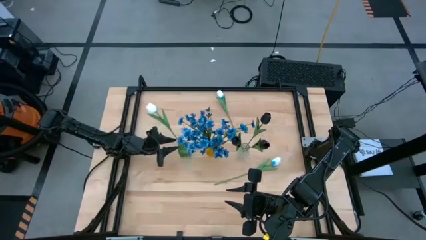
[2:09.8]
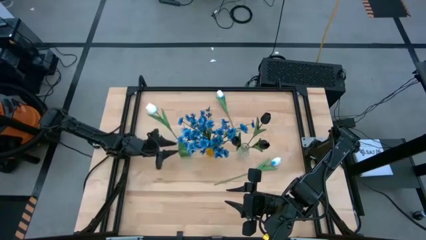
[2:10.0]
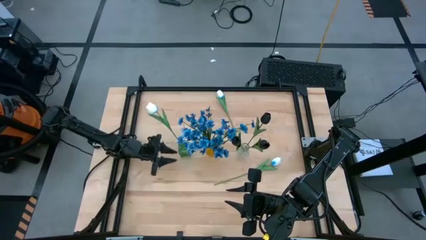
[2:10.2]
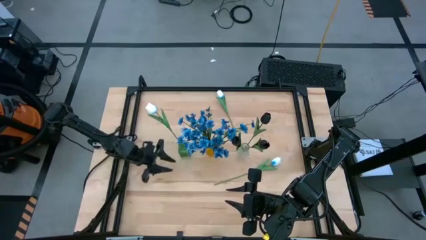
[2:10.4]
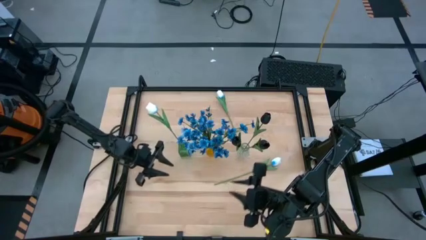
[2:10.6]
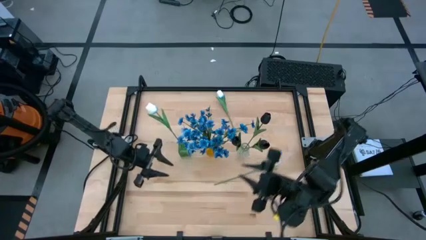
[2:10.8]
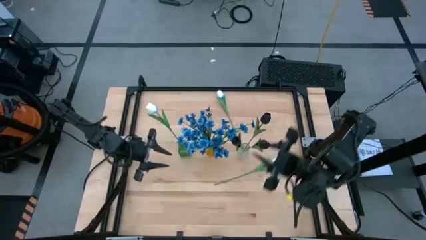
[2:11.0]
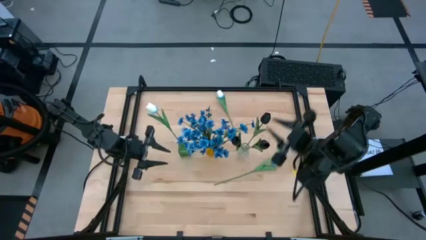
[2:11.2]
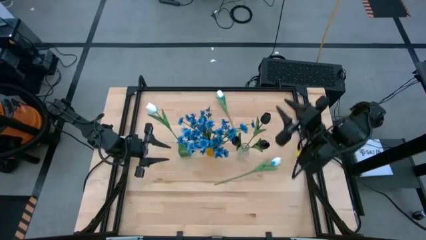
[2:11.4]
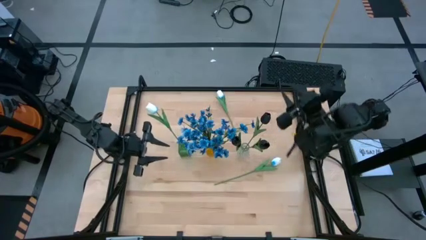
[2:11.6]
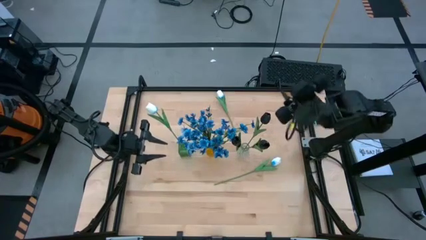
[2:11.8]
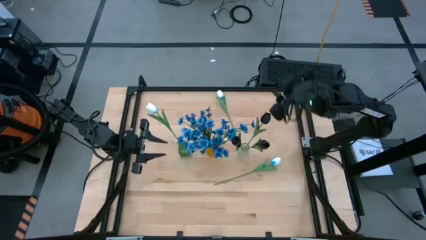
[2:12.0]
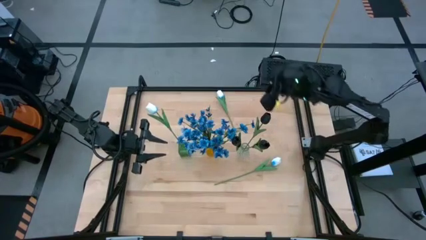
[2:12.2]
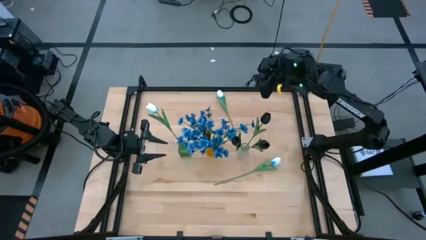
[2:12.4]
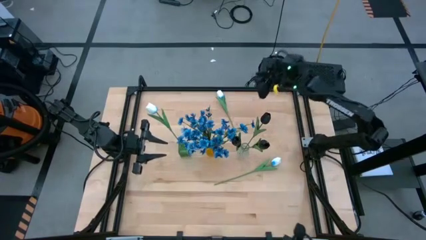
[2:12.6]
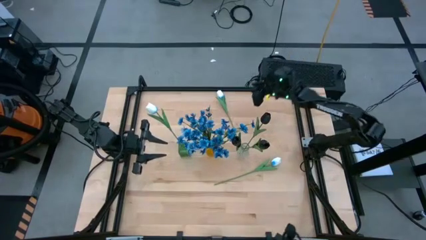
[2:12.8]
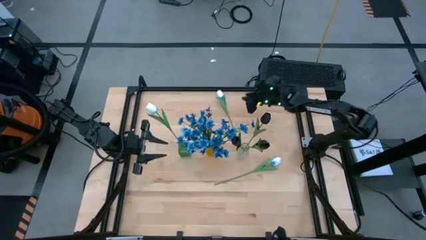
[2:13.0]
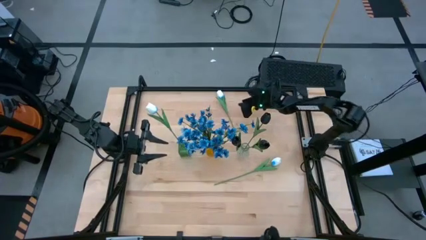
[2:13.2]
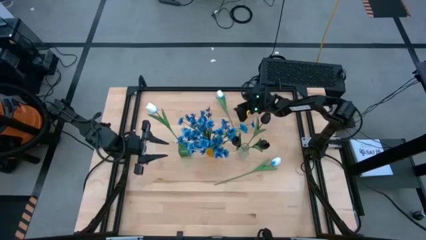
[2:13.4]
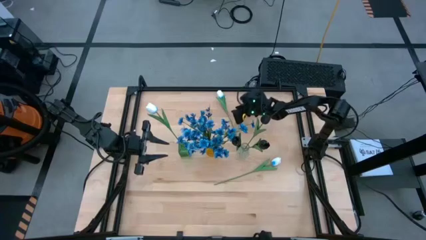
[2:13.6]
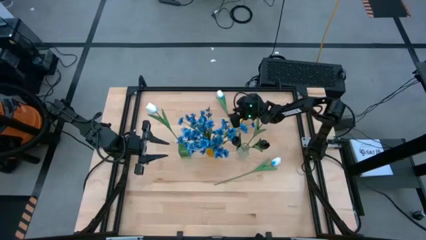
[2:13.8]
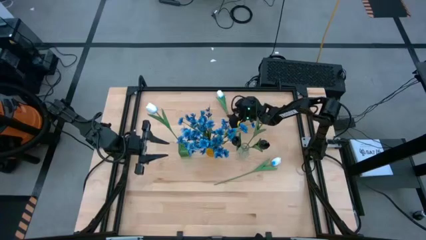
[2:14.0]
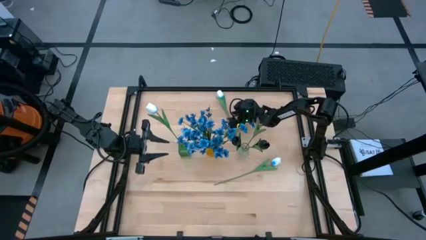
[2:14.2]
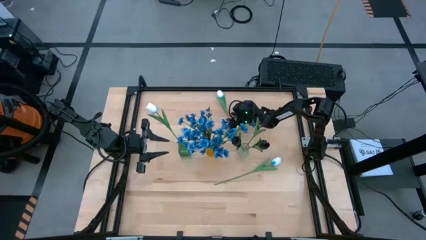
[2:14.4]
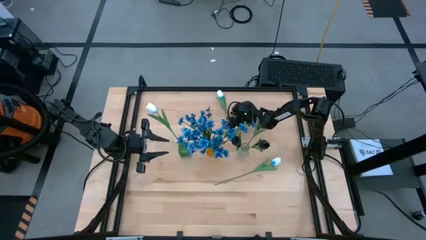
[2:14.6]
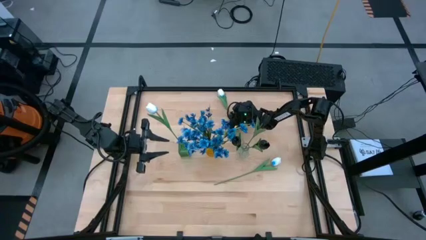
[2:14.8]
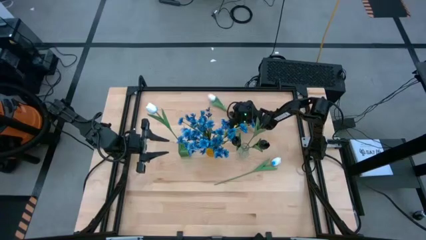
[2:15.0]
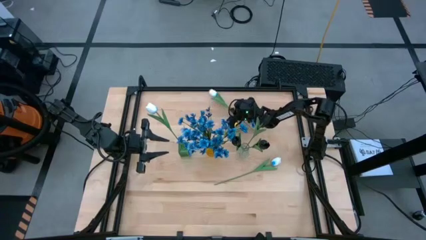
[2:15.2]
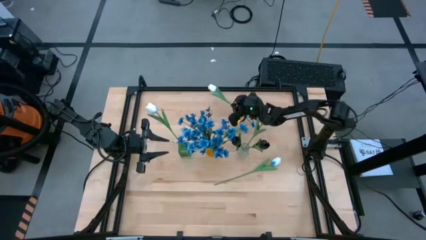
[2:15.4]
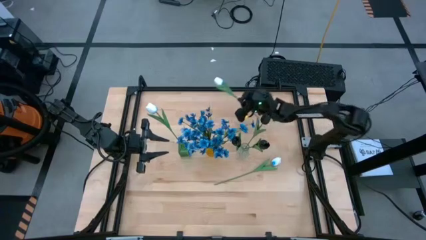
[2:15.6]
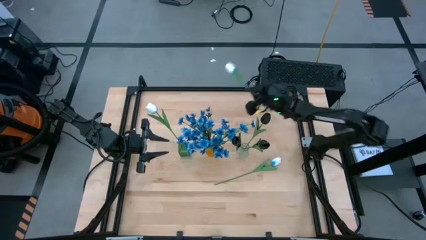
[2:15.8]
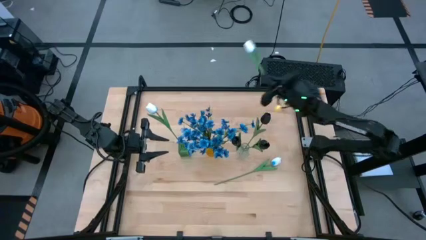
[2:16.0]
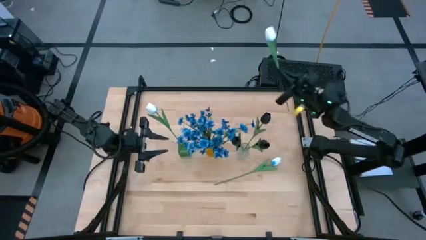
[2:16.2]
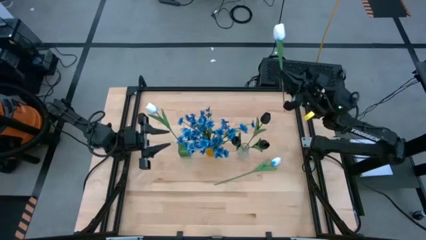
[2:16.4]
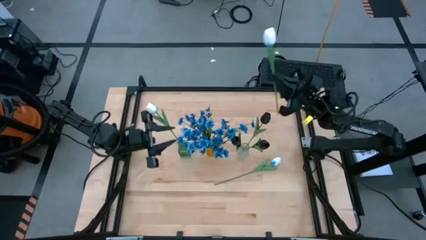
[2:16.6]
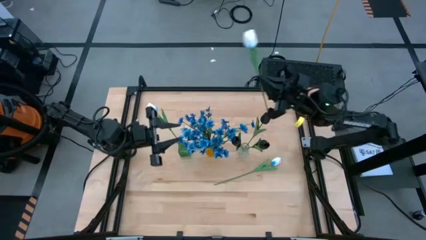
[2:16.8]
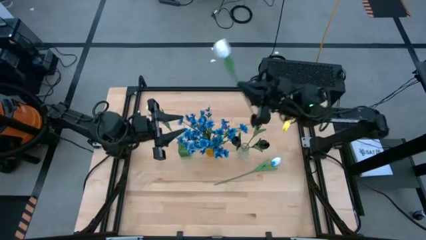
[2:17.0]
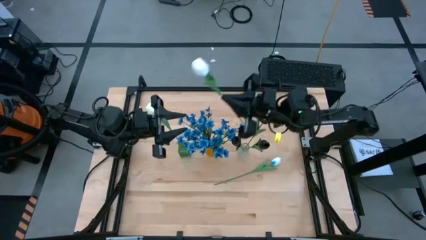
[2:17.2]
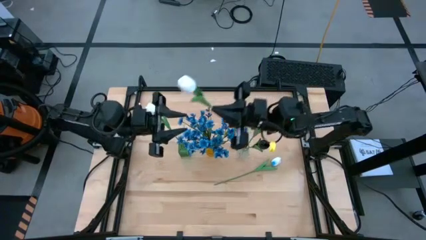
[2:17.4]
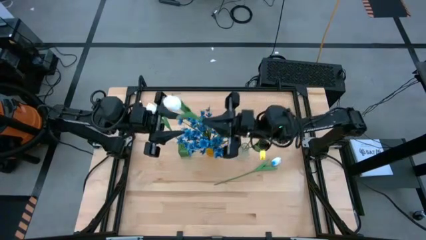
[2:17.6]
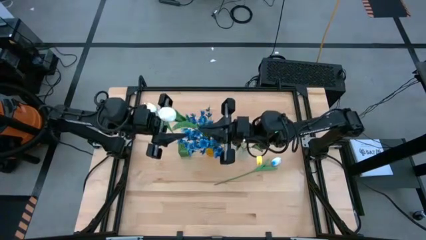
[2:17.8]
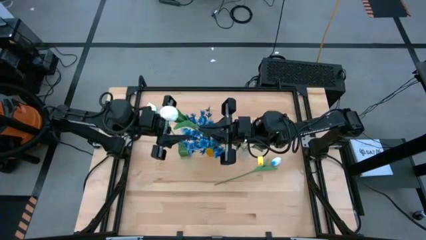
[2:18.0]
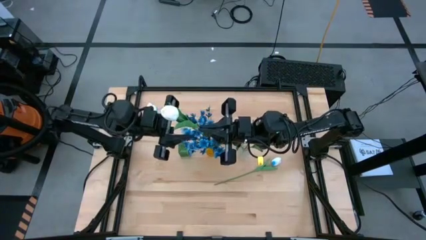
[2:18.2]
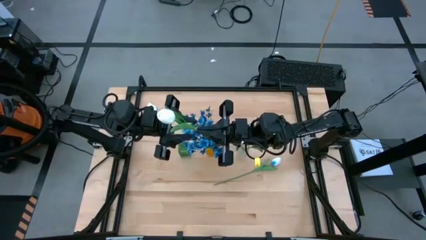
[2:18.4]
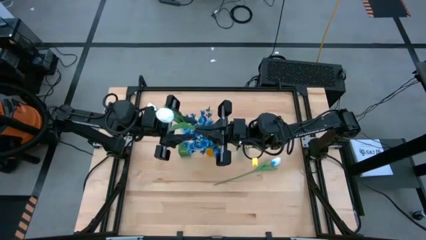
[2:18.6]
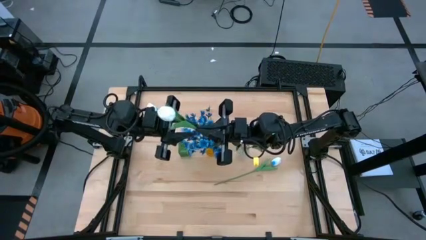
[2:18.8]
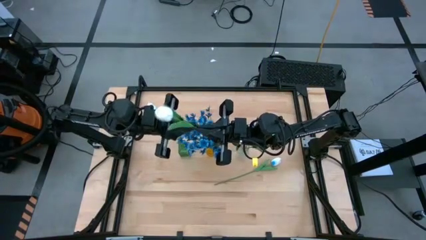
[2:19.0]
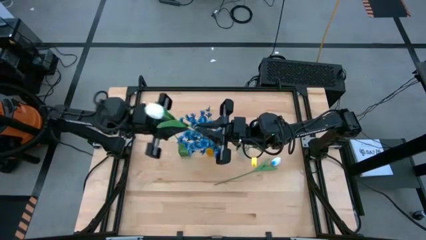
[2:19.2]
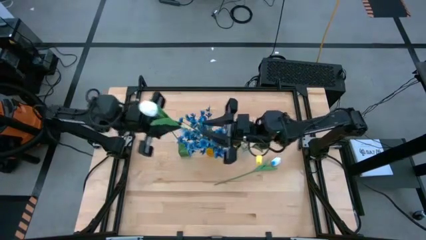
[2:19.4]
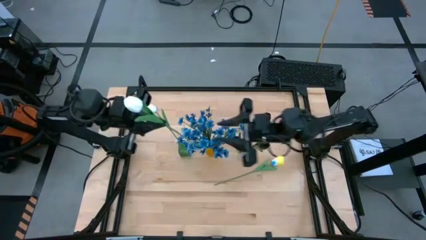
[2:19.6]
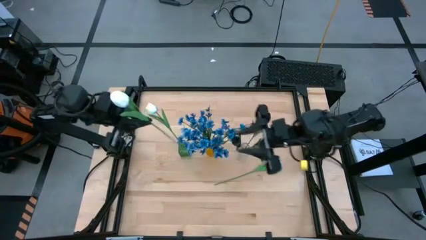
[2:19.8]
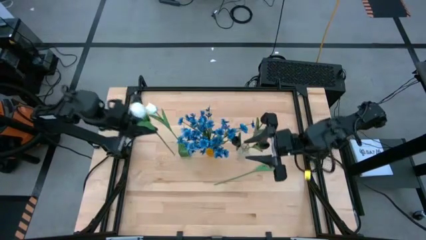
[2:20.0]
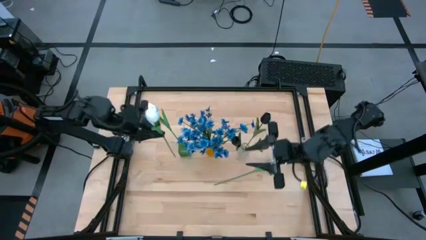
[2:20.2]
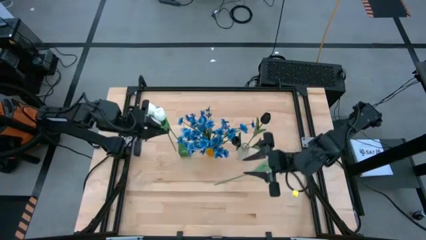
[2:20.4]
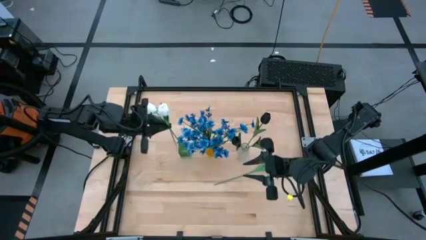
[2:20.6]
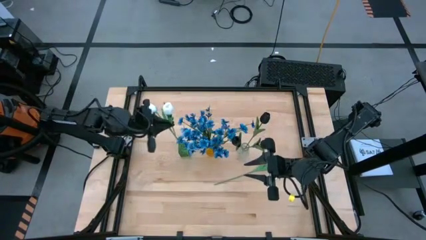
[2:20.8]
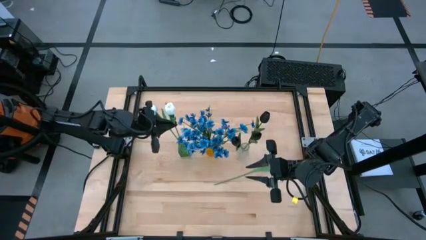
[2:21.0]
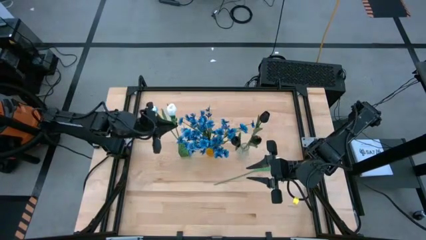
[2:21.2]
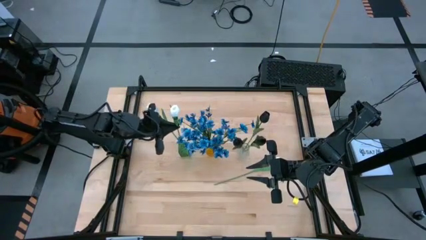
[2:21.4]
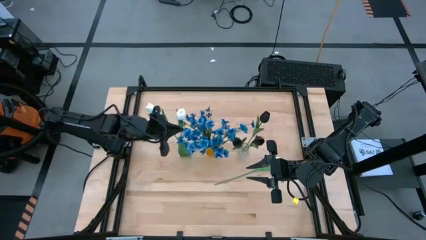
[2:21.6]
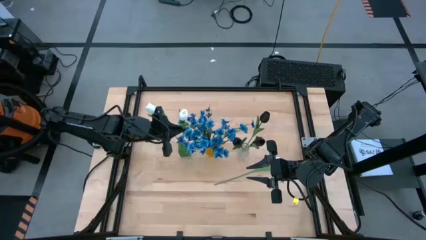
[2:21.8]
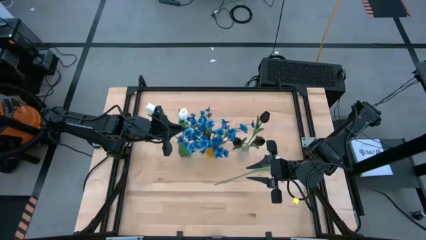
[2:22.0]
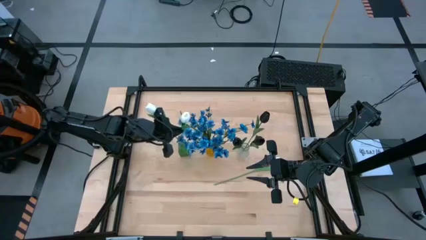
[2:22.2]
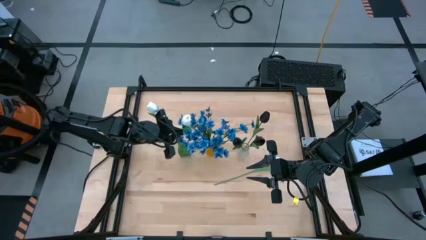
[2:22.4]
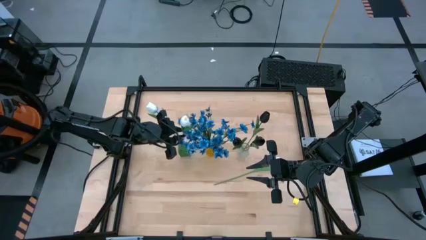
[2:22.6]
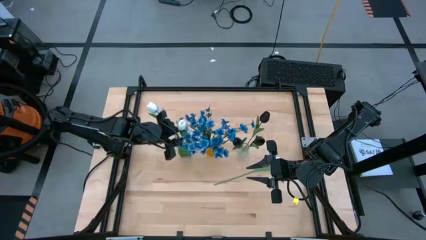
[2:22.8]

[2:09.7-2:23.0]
Task: Sort flowers into vase by color
Put the top white flower into the green vase

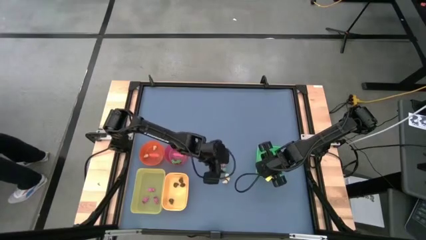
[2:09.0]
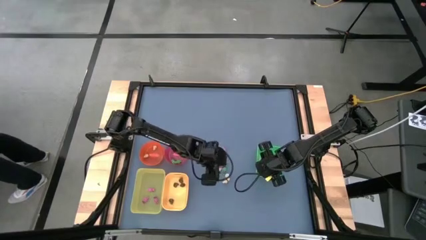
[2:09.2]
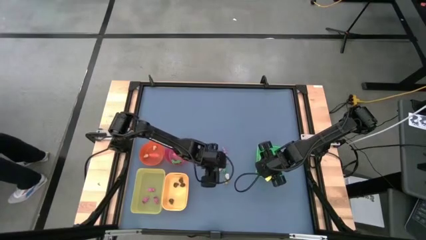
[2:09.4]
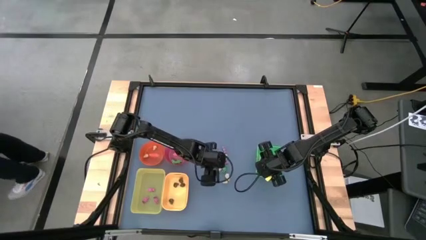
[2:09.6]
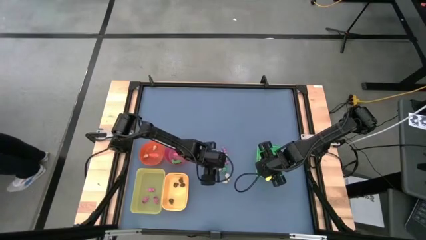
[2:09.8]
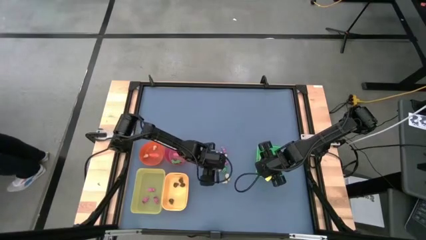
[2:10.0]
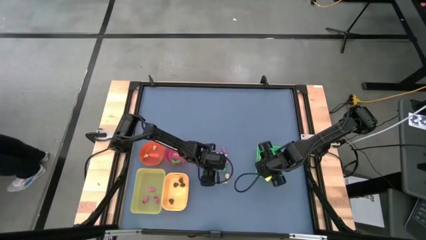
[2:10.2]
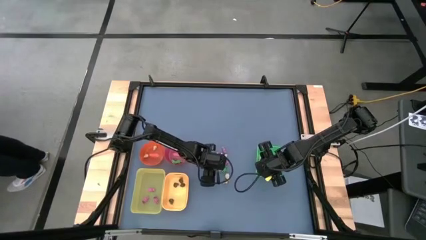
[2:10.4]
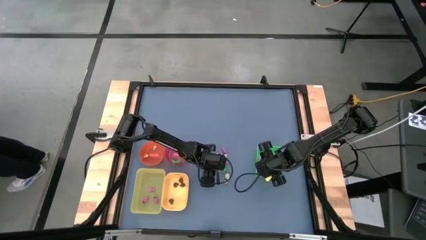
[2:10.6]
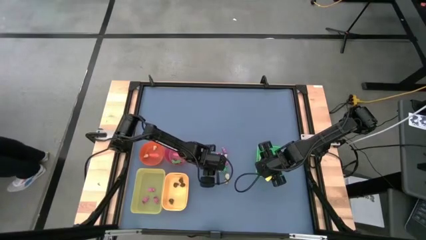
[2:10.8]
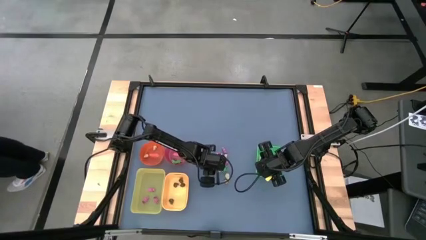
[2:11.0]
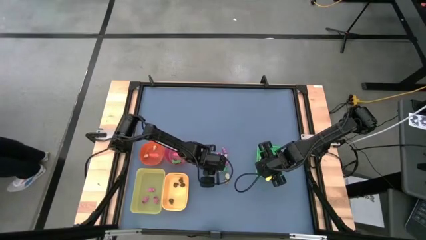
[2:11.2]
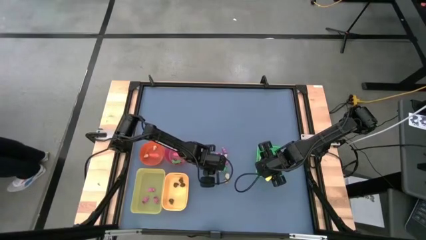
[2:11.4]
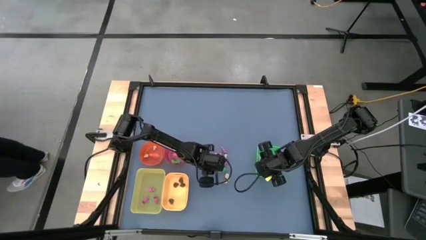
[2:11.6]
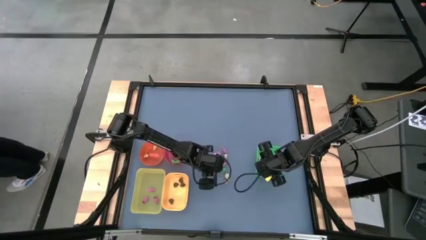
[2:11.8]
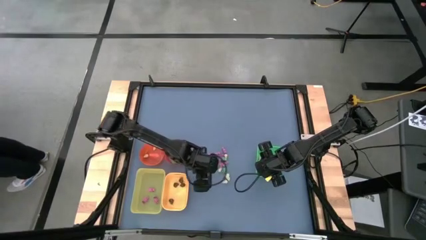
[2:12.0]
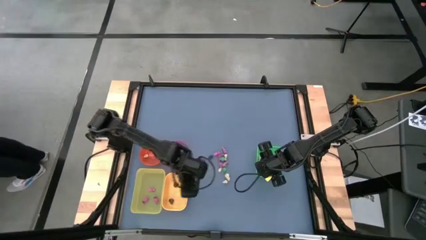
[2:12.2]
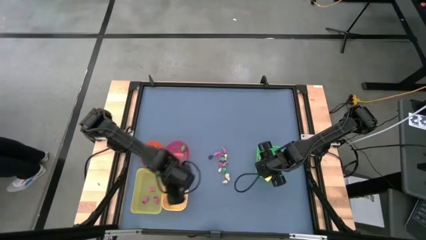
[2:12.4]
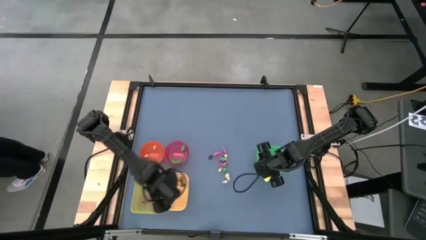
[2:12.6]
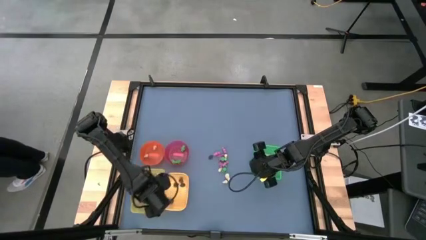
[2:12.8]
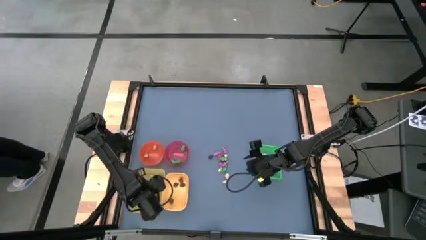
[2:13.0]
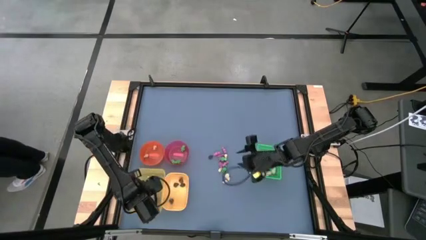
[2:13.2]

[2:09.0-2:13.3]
Task: Sort Halloween decoration
Put the pink skeleton toy into the light yellow bin
